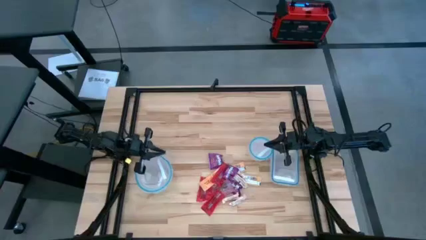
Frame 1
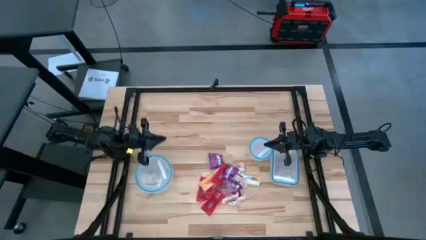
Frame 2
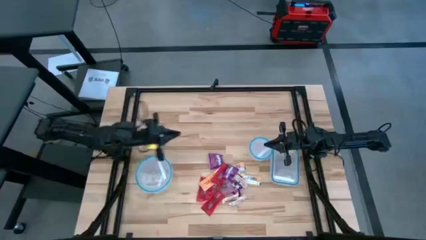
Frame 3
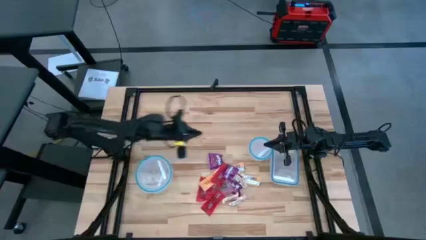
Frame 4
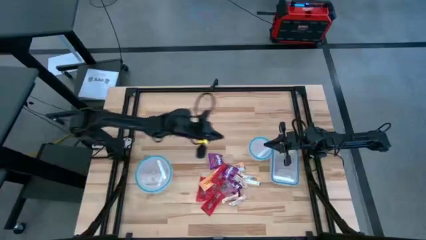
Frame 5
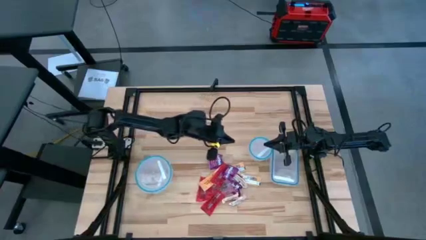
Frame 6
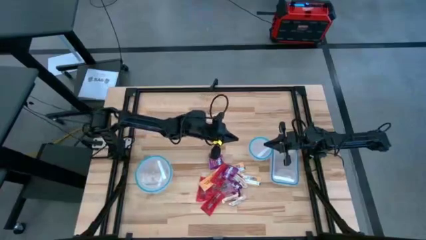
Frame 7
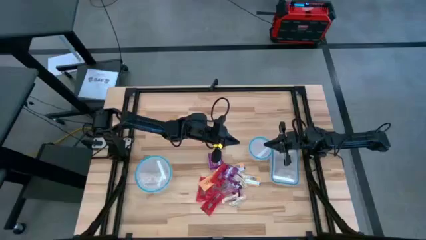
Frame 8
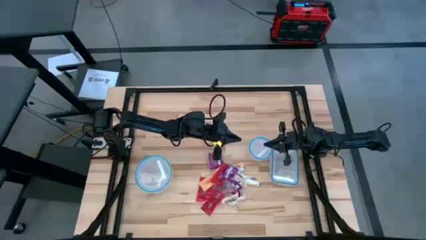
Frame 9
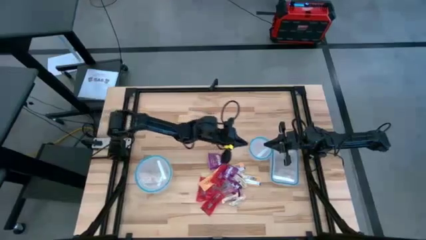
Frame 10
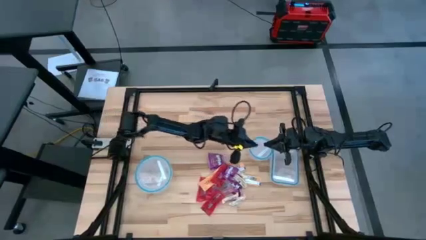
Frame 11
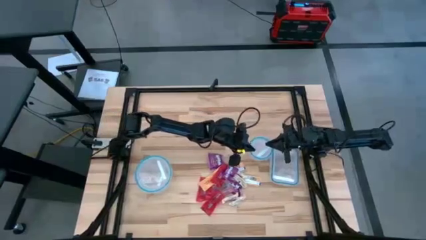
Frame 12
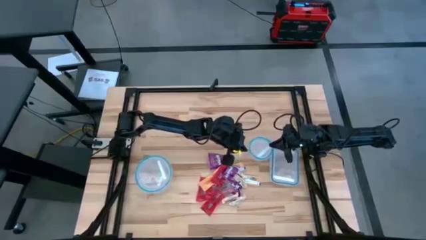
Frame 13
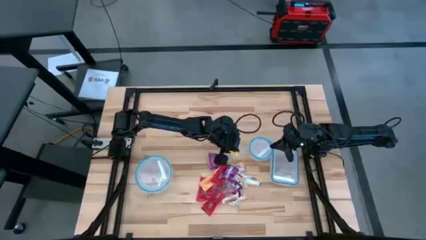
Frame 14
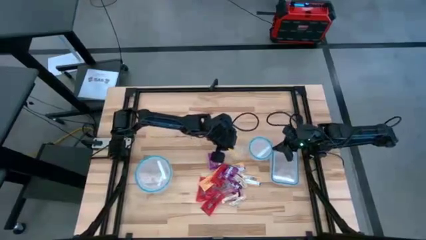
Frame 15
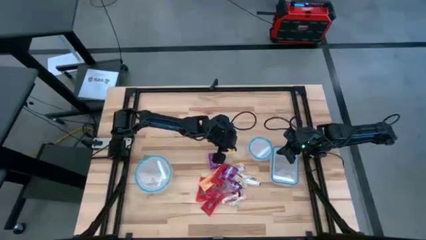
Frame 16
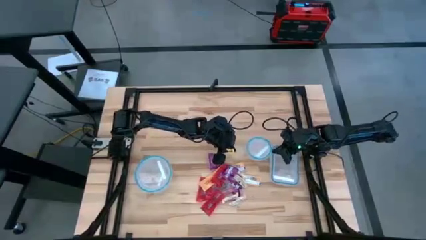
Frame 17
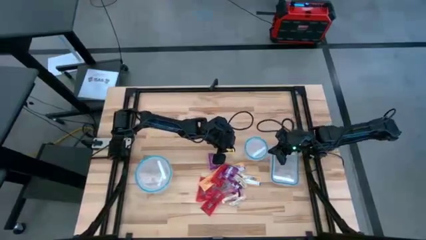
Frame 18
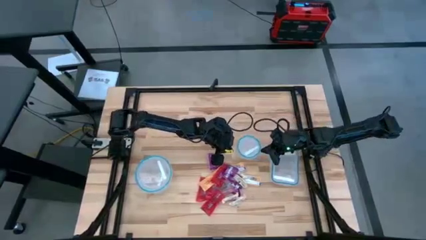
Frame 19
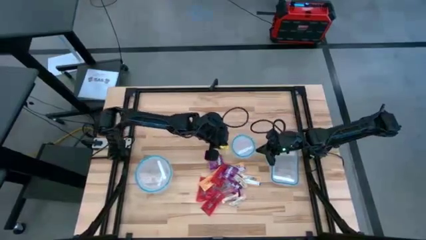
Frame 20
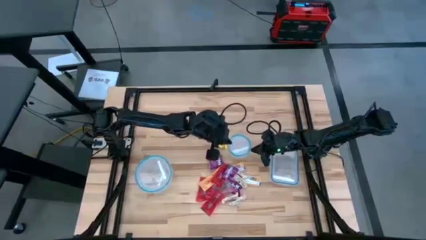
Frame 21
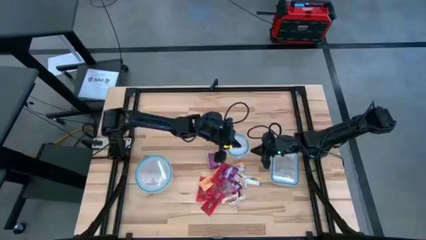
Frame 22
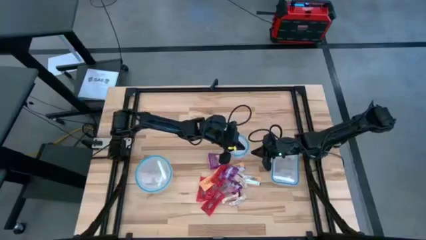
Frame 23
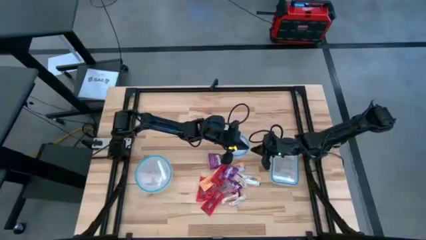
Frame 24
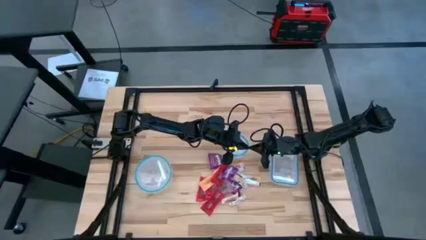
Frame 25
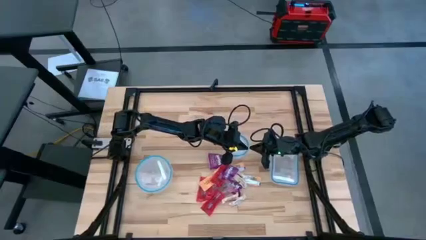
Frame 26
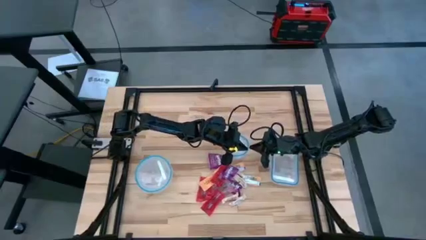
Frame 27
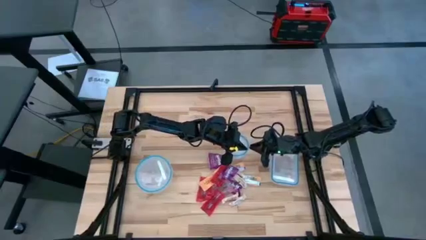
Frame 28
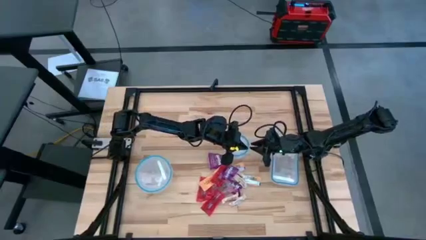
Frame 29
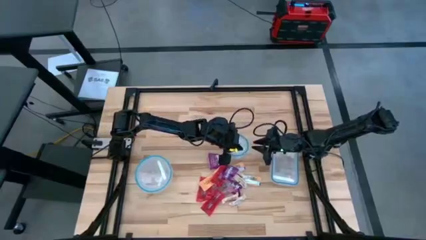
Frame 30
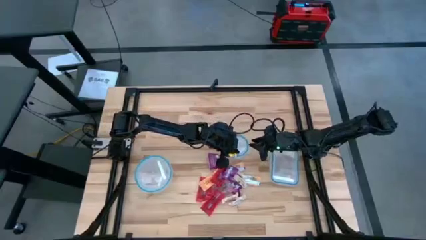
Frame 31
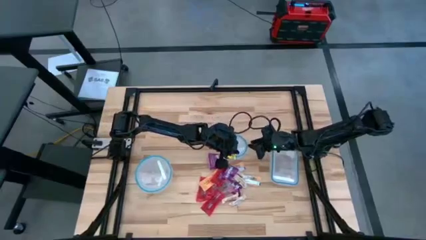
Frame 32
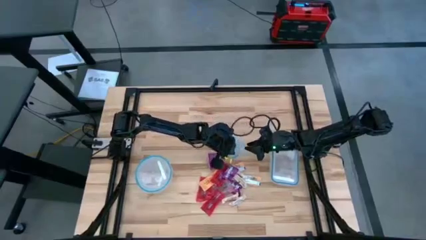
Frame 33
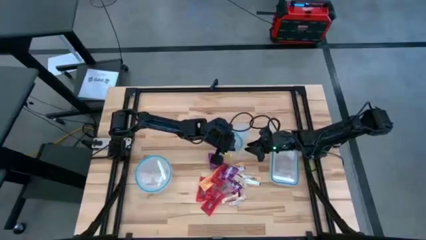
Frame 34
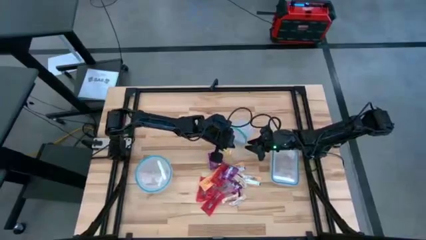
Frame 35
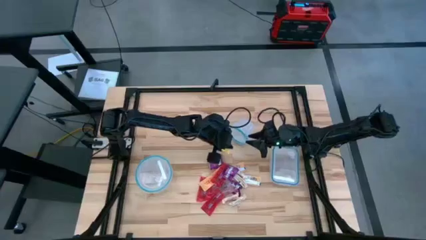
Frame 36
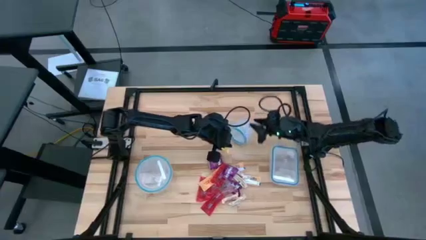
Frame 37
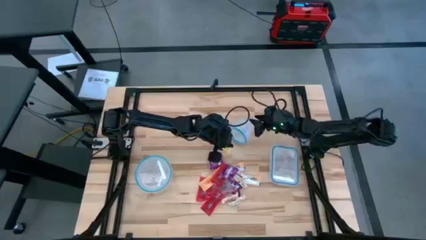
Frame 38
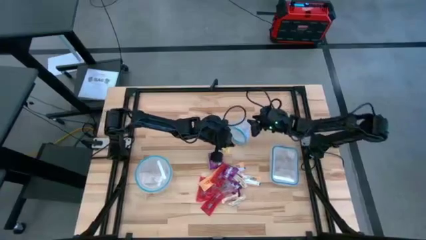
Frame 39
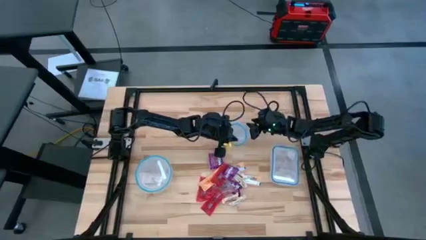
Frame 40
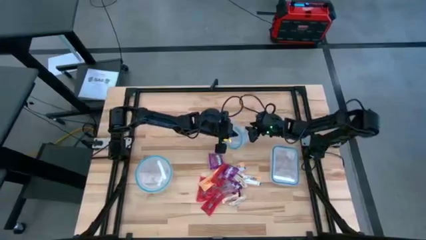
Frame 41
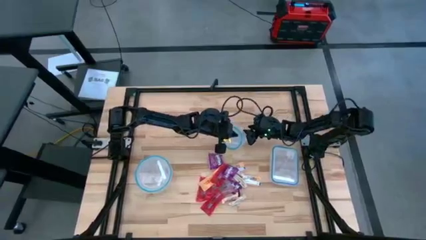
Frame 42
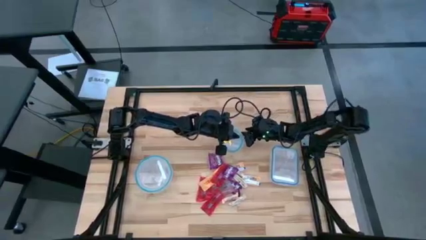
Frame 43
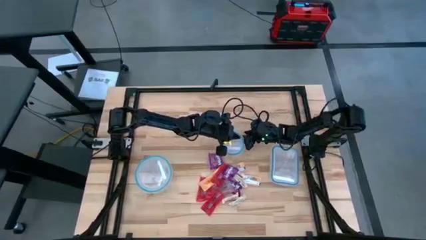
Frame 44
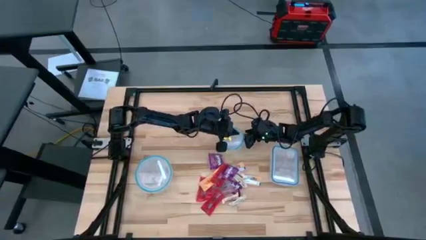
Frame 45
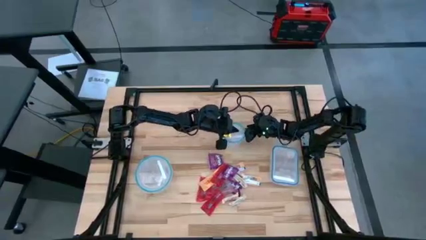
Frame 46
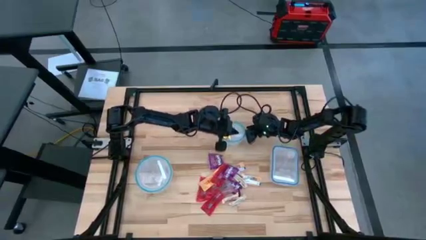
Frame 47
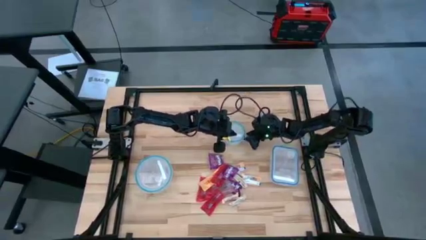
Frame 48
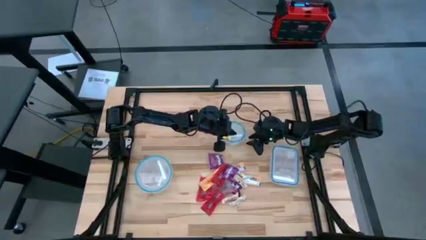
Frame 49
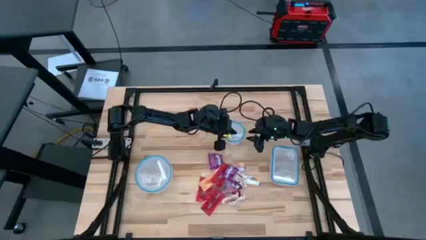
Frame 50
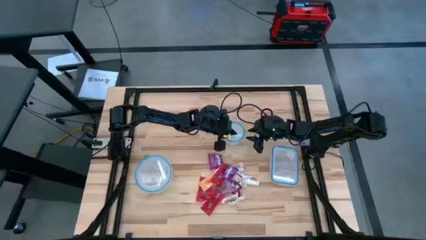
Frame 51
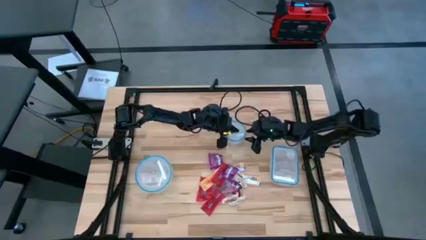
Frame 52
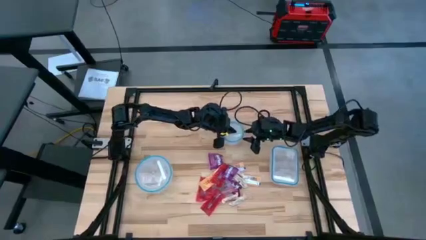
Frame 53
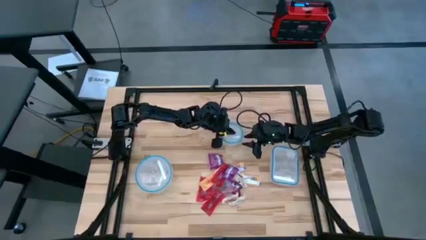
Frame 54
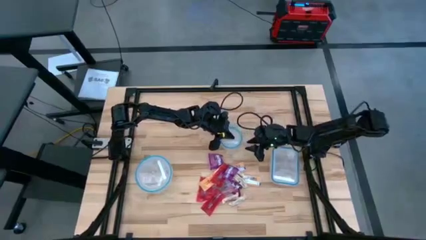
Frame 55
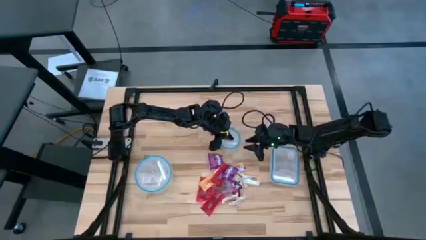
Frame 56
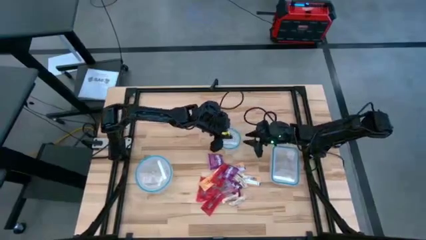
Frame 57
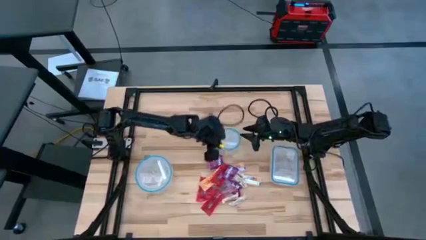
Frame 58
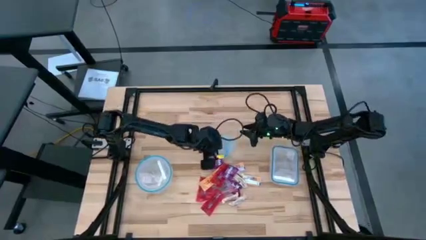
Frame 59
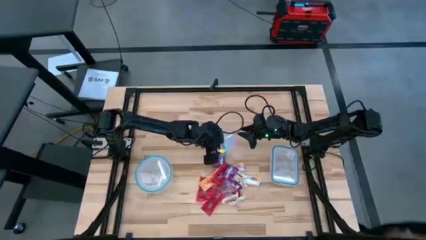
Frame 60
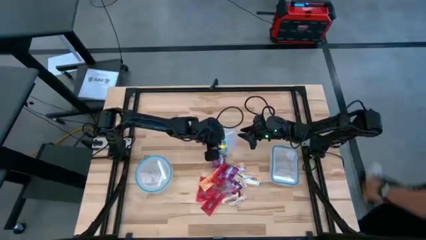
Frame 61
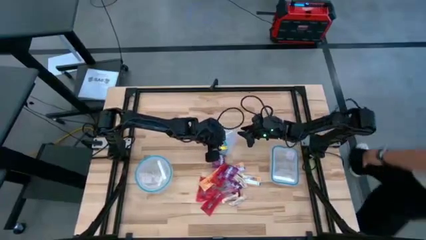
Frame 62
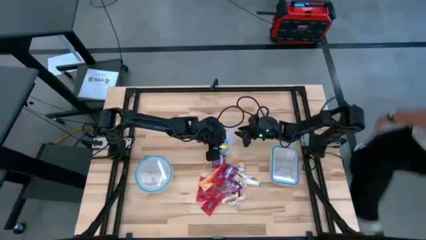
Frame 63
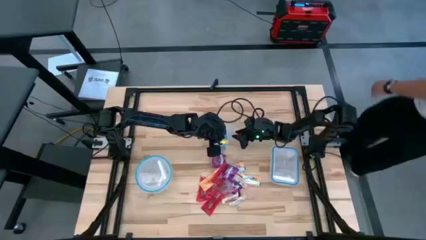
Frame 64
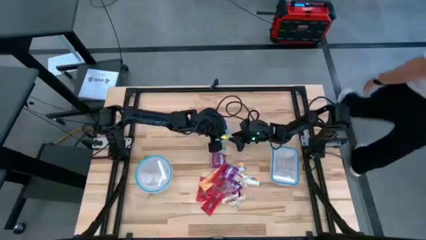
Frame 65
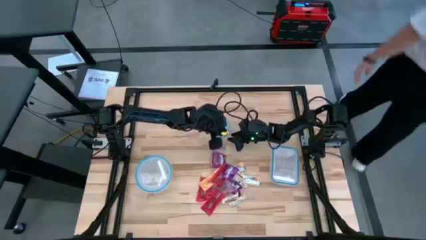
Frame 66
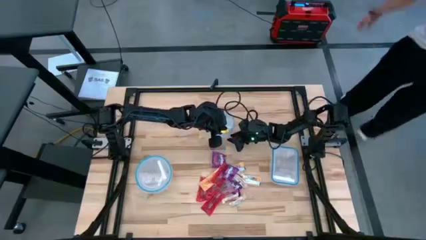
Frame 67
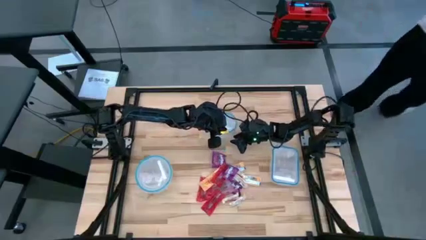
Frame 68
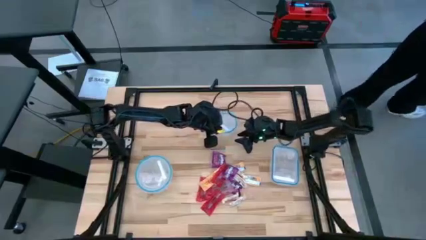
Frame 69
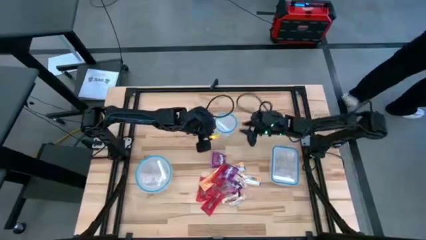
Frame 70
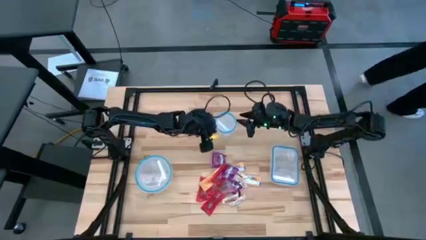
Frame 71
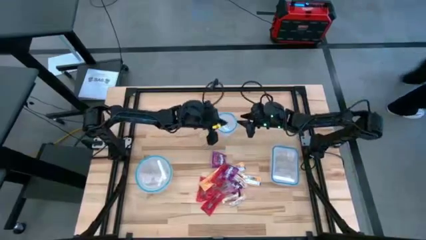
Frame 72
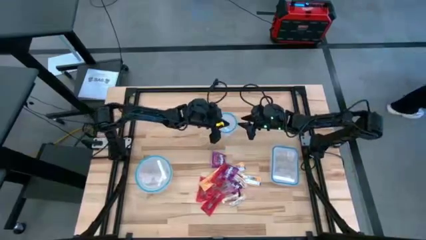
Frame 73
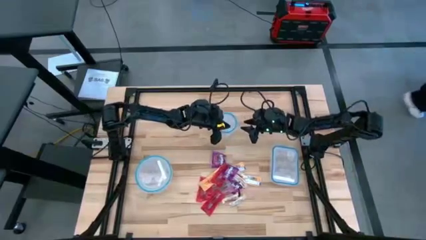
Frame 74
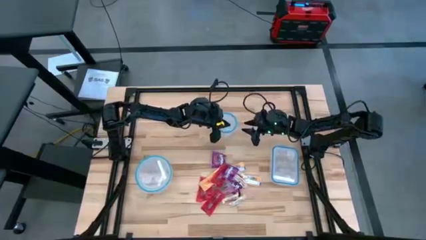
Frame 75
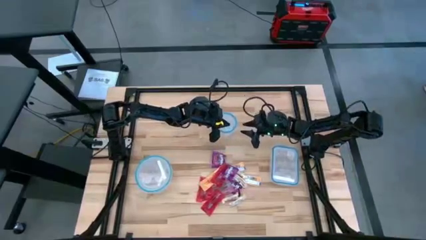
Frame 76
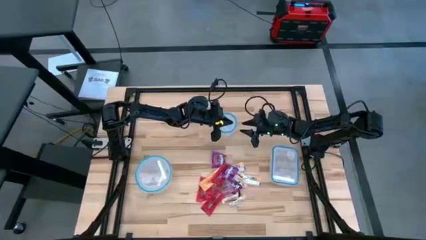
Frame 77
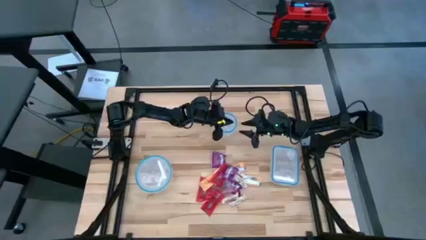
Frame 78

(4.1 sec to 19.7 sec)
Task: Sort candy
Open the small circular transparent bin
